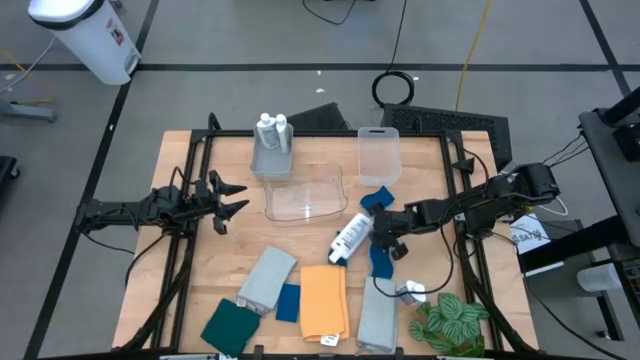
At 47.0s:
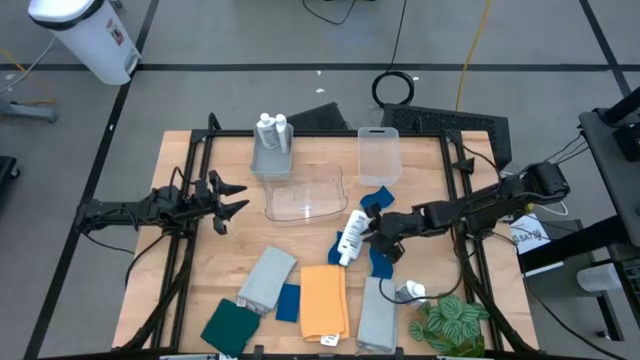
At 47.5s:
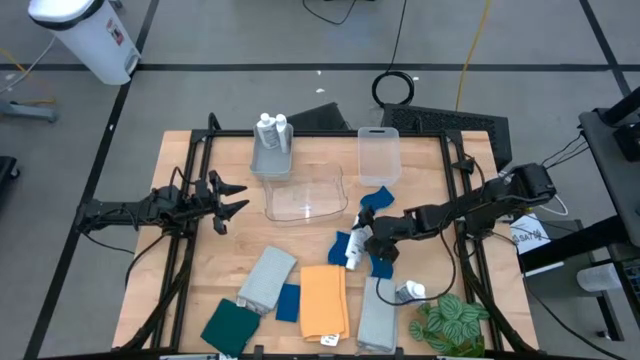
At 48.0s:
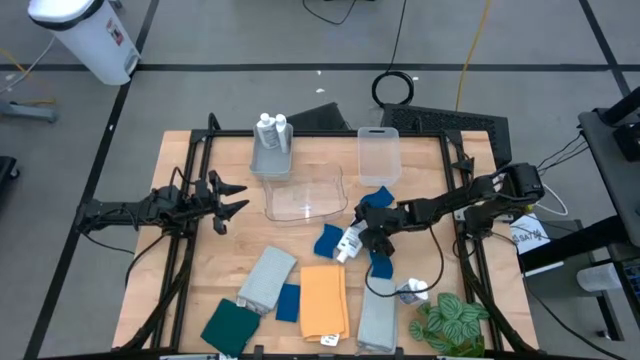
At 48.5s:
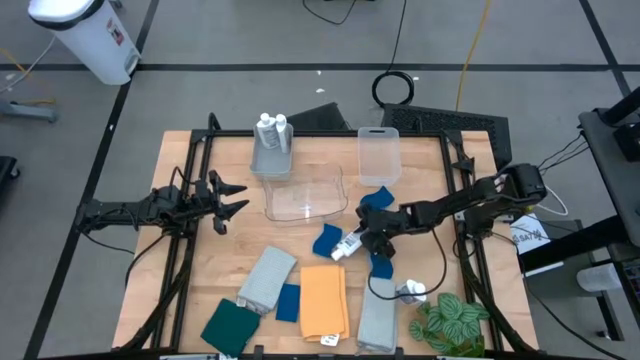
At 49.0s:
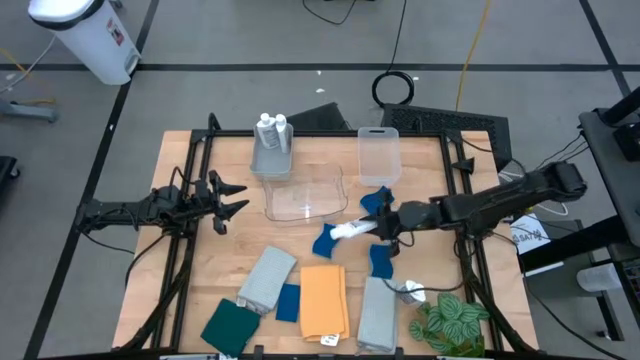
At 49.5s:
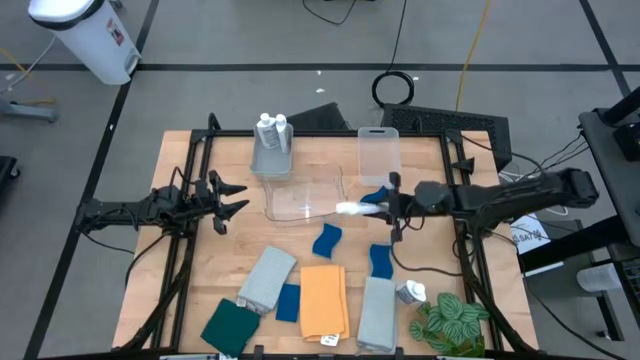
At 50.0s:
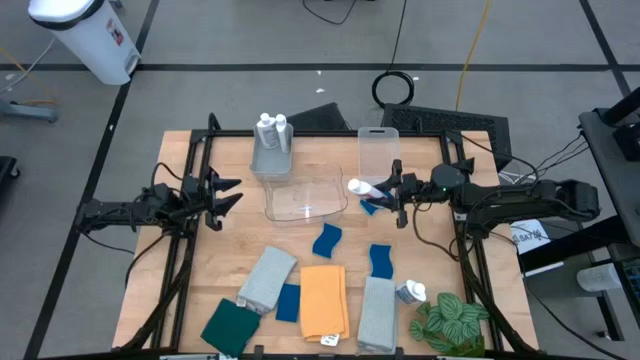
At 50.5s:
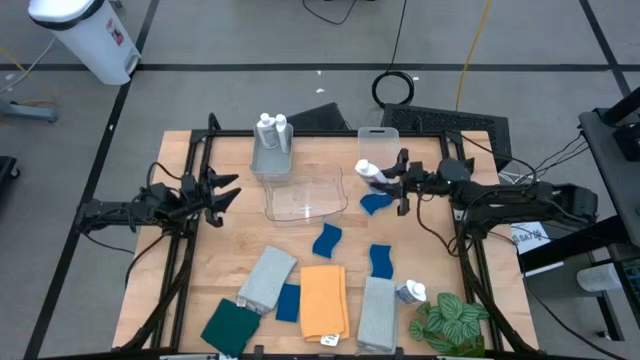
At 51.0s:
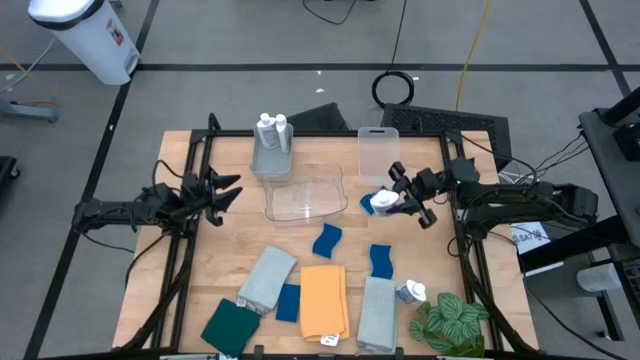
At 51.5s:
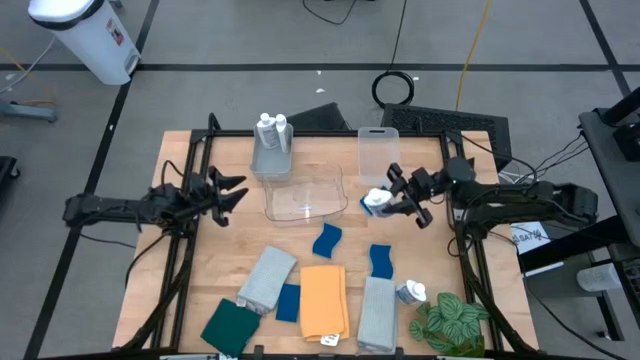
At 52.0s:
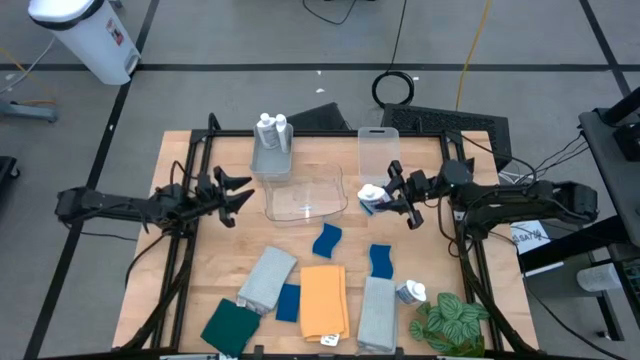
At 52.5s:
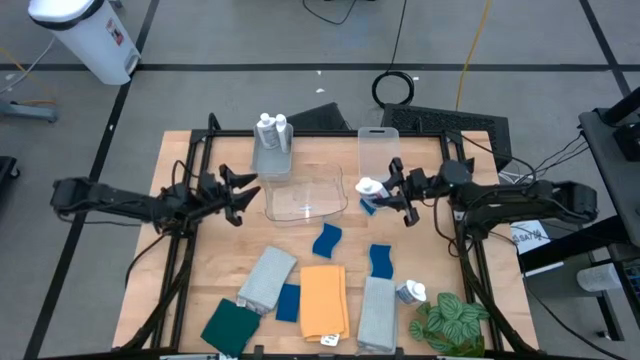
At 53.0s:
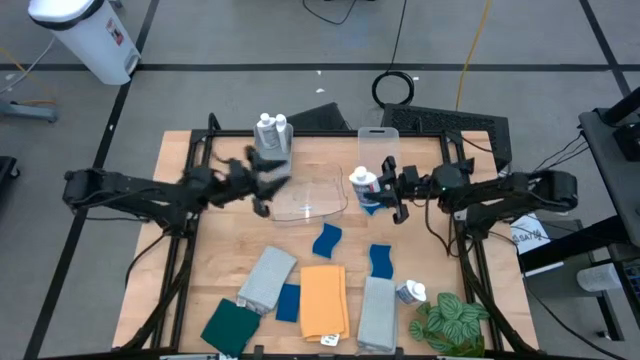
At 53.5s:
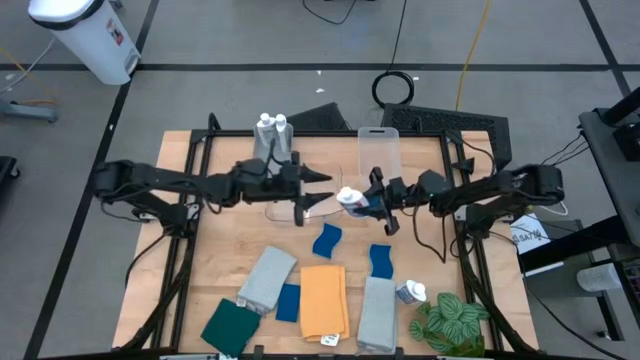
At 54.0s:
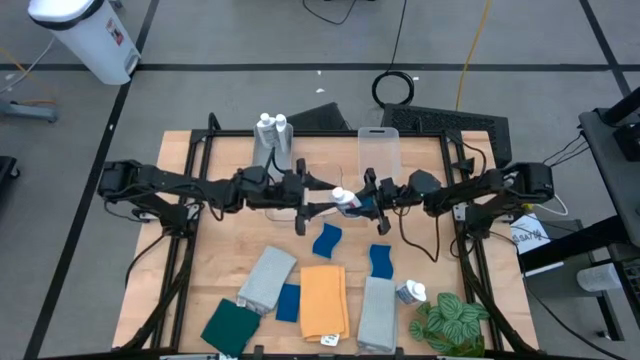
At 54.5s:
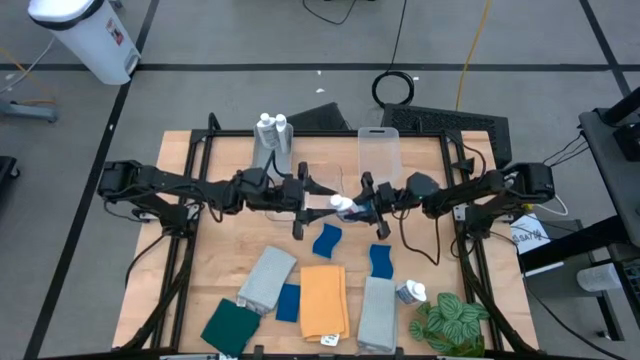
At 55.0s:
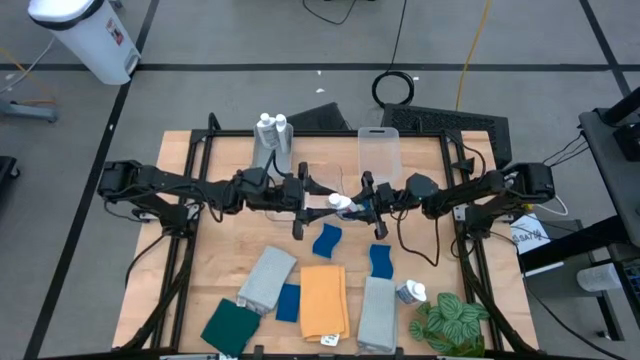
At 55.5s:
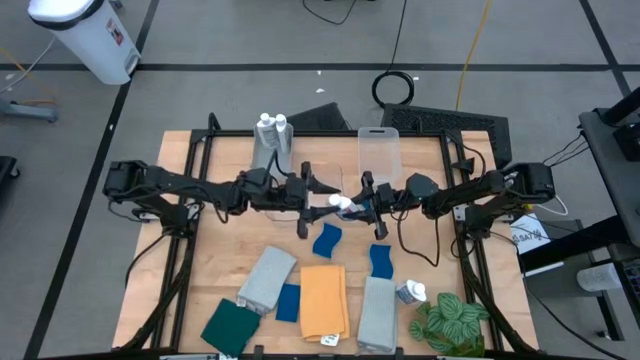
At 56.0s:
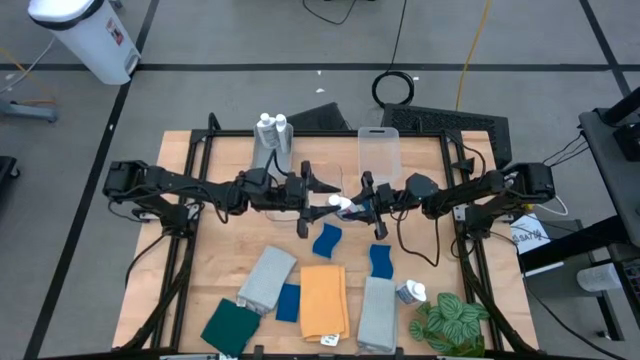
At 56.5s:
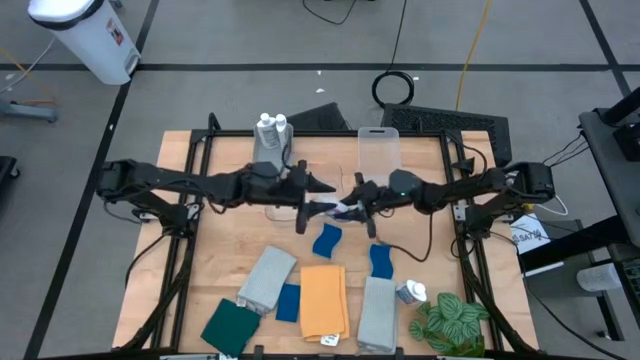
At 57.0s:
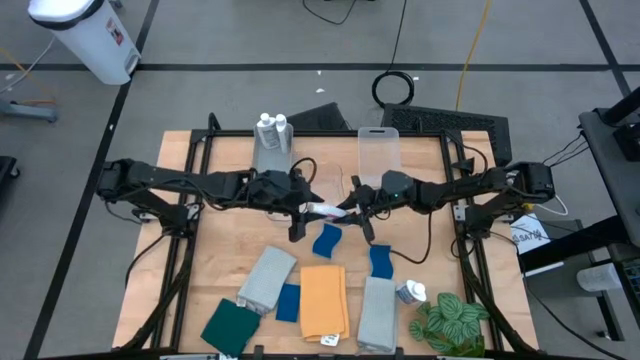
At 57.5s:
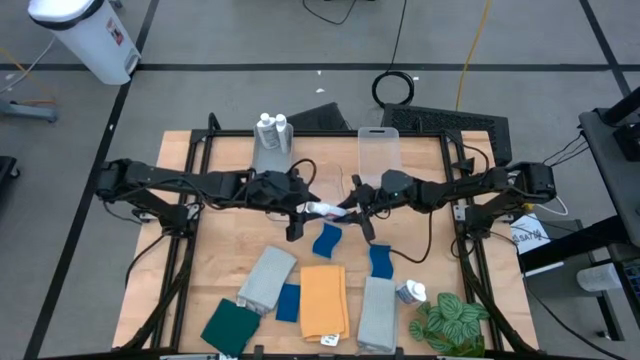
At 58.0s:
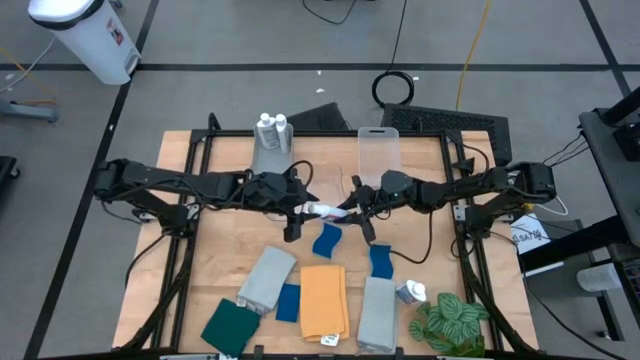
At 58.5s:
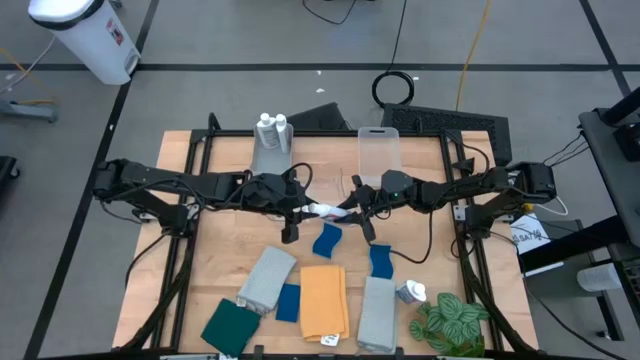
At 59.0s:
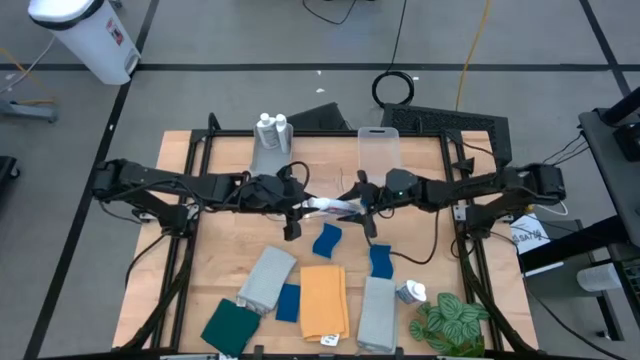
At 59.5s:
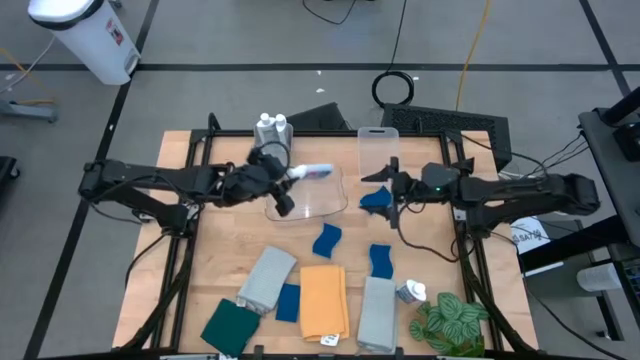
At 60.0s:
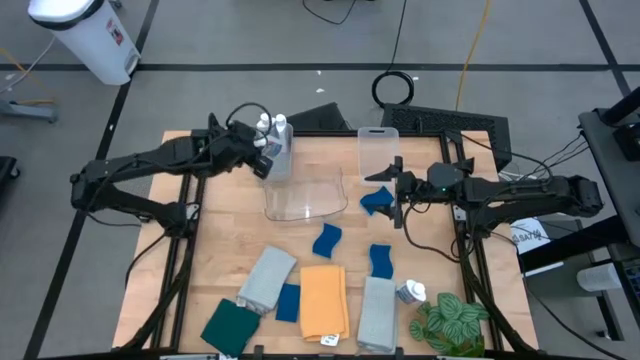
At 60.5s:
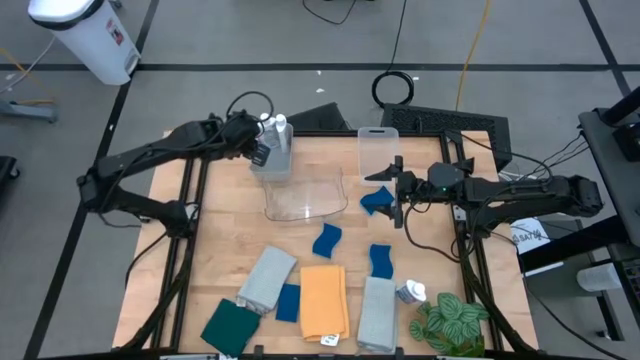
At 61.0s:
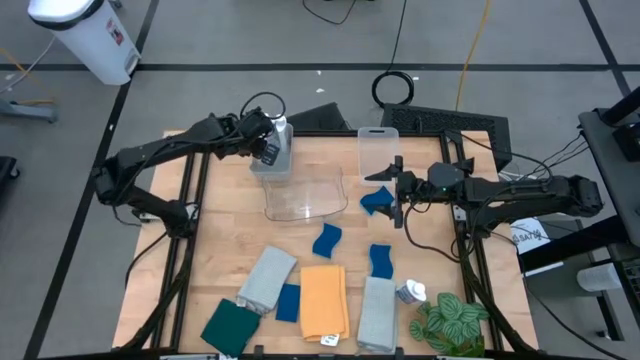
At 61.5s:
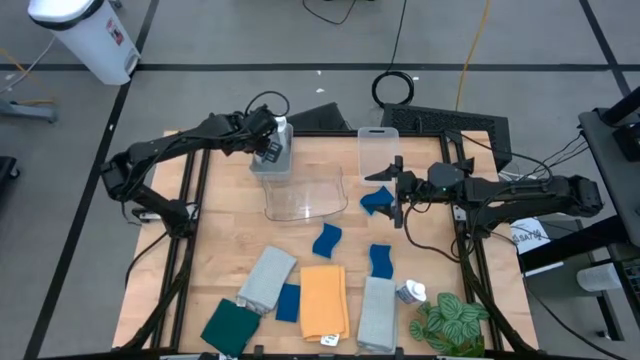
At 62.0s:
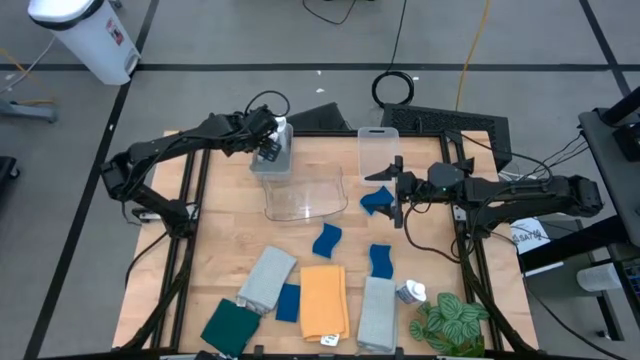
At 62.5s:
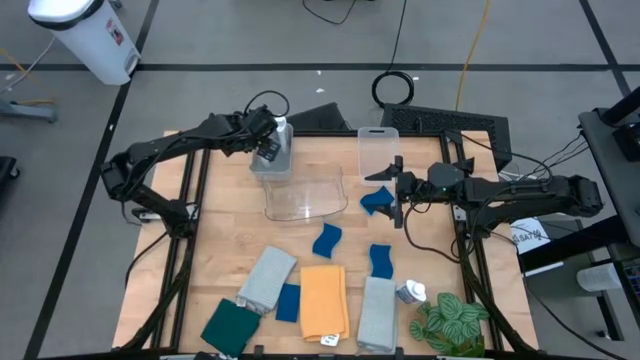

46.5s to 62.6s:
Task: Pick & Place Kitchen Items
Put the white plastic restorer bottle into the gray bin
